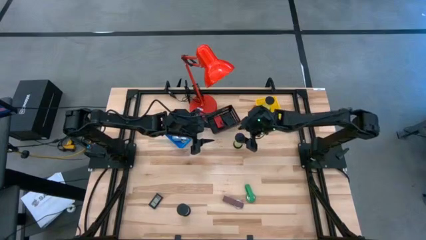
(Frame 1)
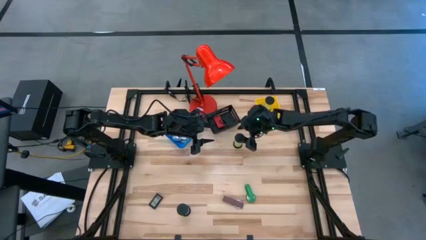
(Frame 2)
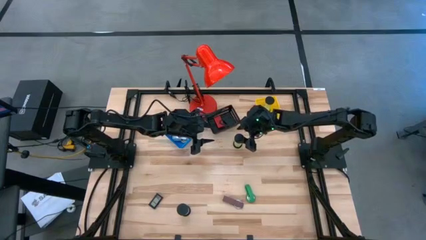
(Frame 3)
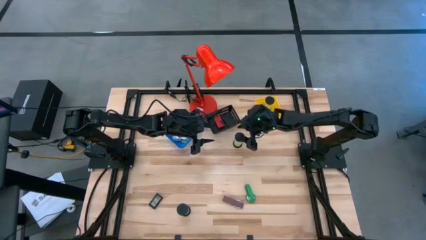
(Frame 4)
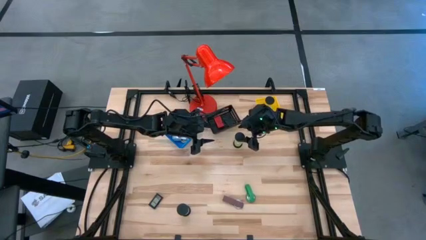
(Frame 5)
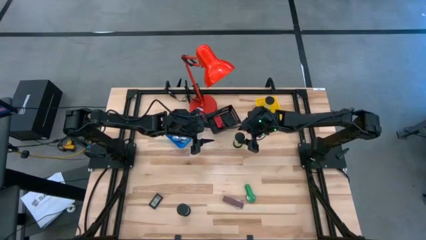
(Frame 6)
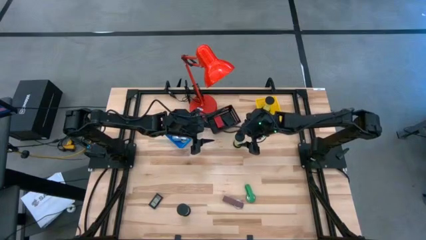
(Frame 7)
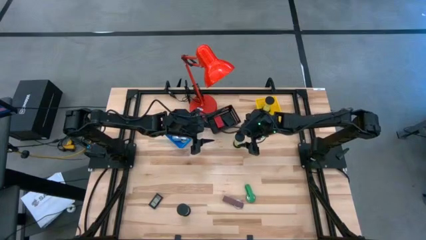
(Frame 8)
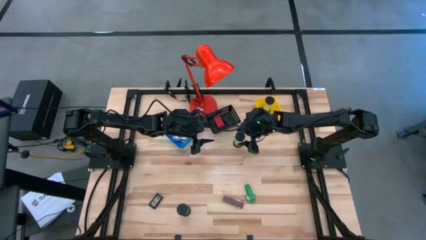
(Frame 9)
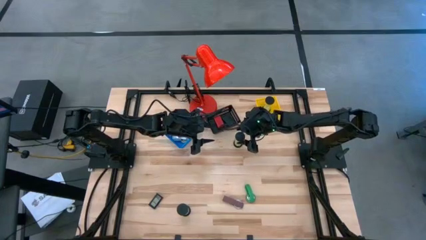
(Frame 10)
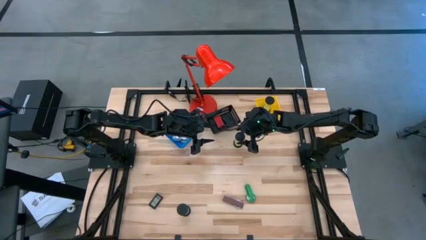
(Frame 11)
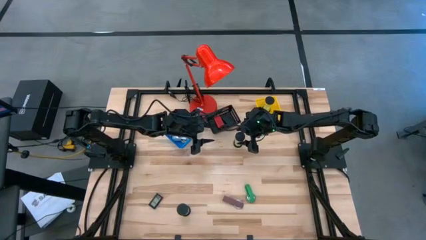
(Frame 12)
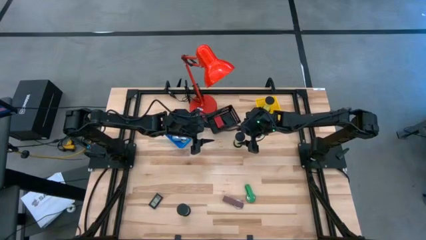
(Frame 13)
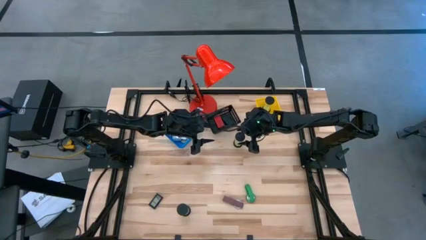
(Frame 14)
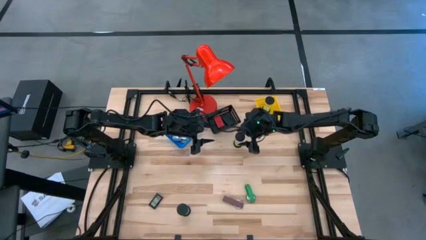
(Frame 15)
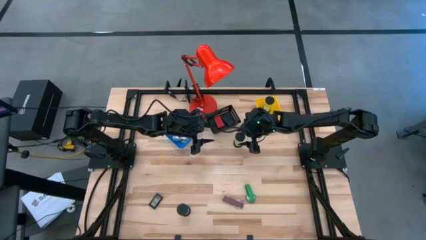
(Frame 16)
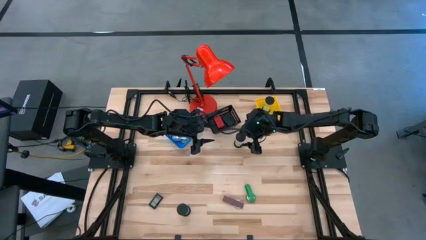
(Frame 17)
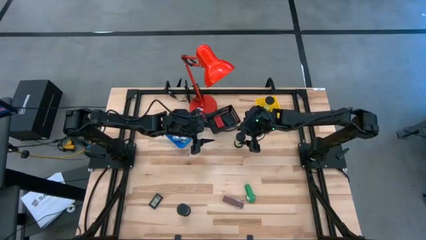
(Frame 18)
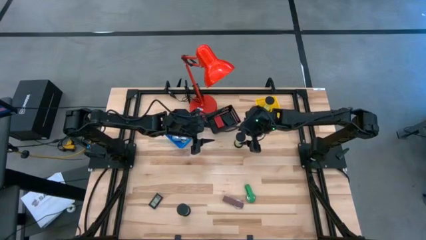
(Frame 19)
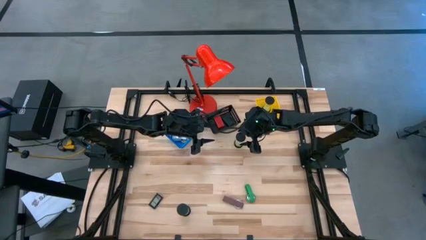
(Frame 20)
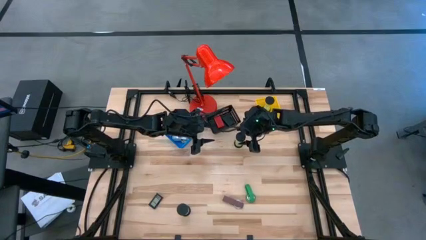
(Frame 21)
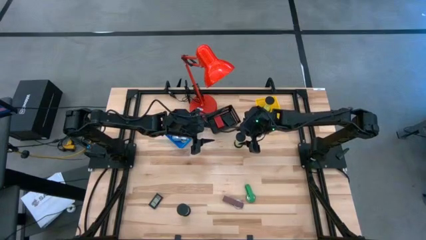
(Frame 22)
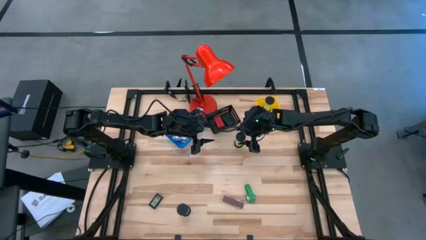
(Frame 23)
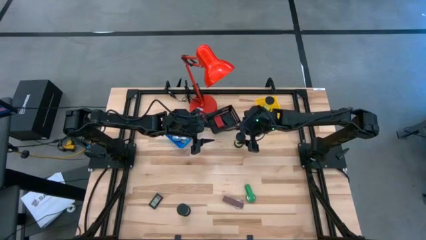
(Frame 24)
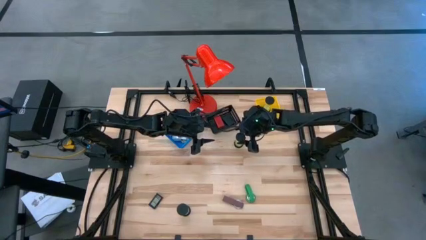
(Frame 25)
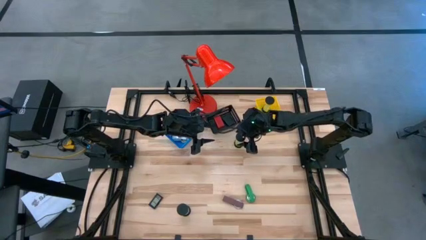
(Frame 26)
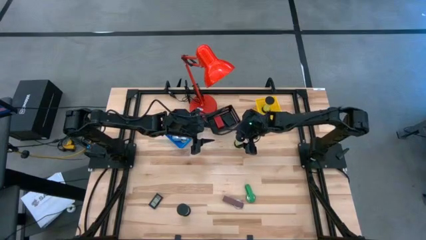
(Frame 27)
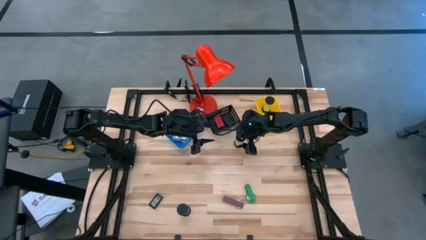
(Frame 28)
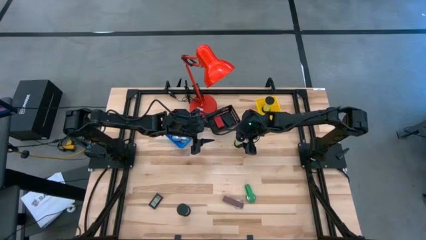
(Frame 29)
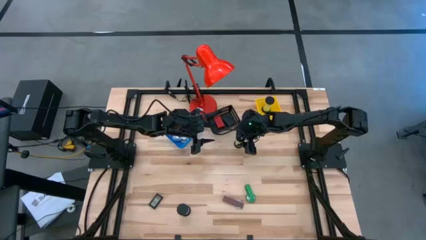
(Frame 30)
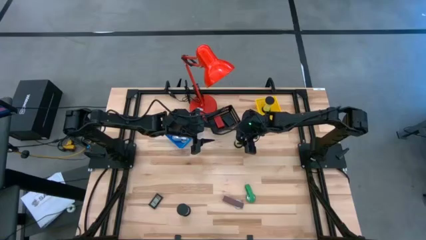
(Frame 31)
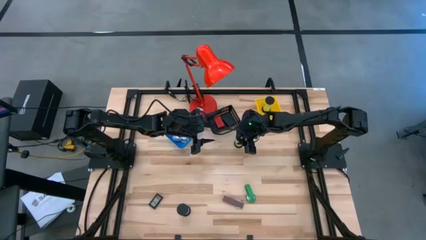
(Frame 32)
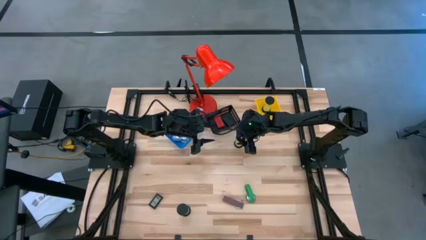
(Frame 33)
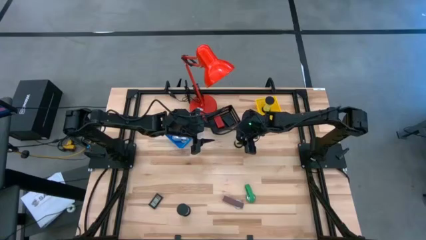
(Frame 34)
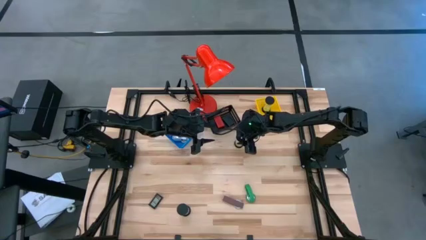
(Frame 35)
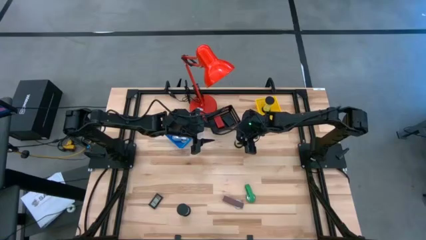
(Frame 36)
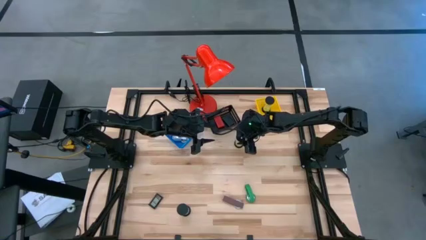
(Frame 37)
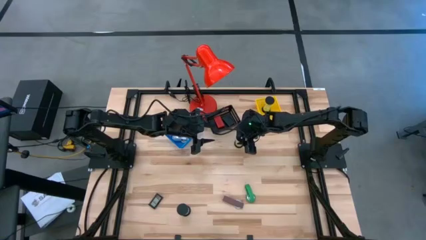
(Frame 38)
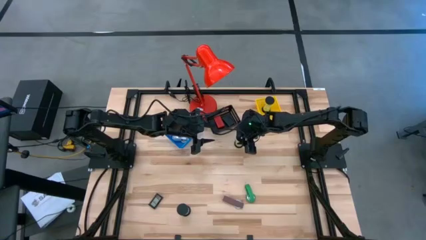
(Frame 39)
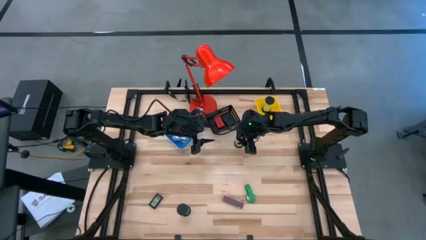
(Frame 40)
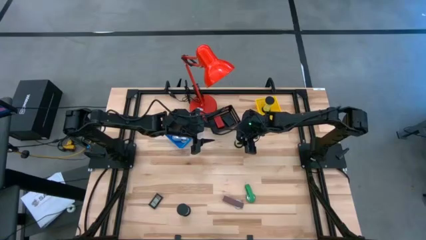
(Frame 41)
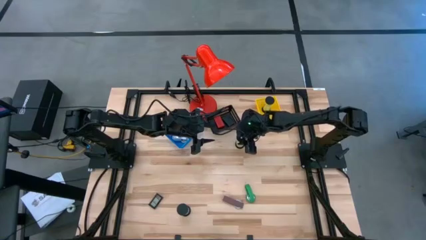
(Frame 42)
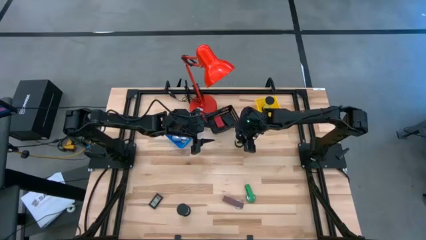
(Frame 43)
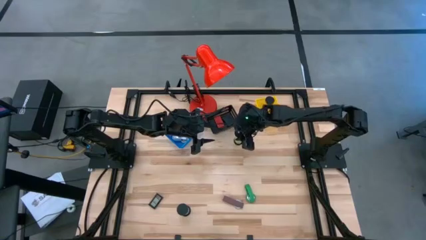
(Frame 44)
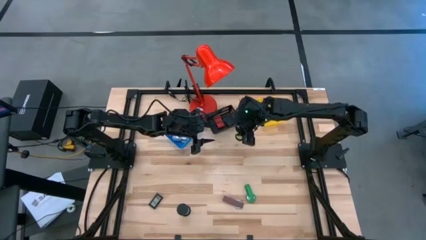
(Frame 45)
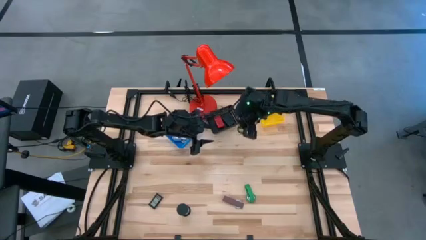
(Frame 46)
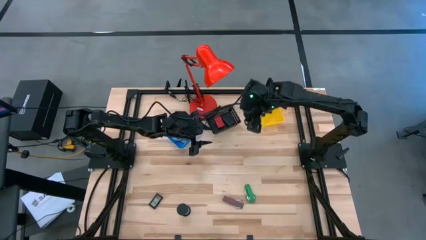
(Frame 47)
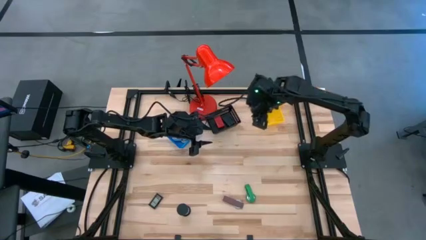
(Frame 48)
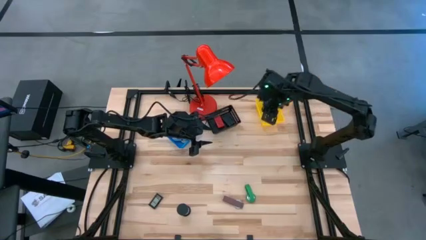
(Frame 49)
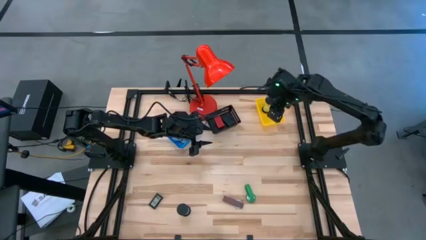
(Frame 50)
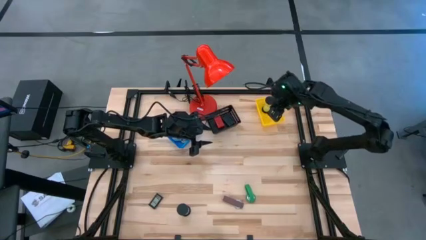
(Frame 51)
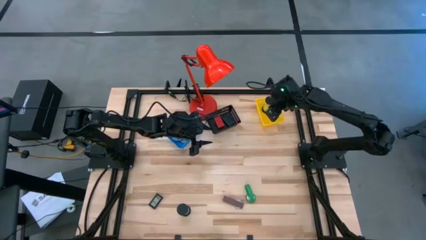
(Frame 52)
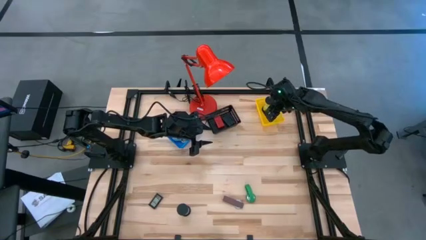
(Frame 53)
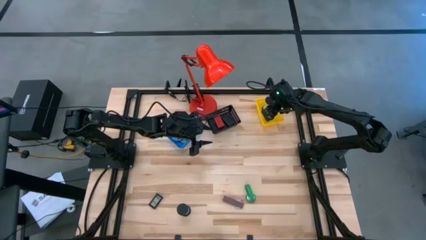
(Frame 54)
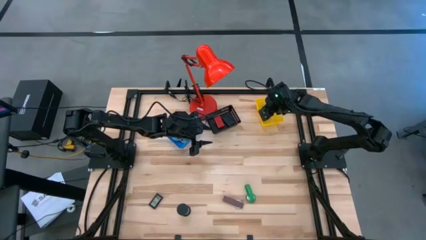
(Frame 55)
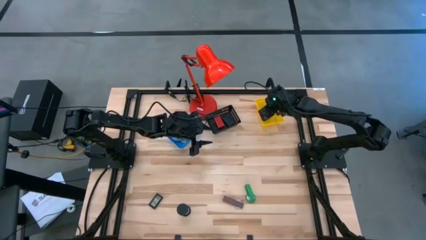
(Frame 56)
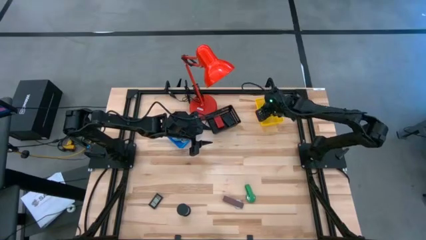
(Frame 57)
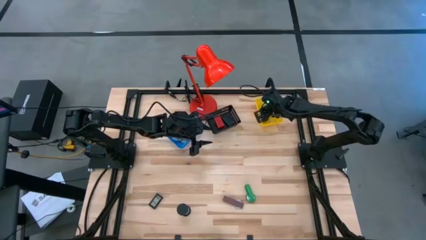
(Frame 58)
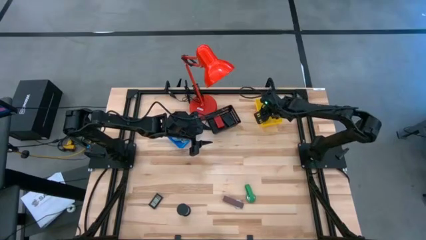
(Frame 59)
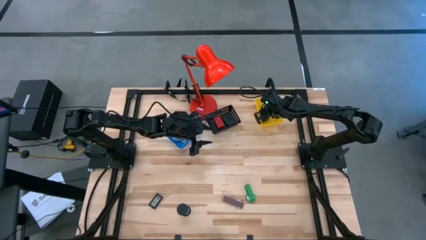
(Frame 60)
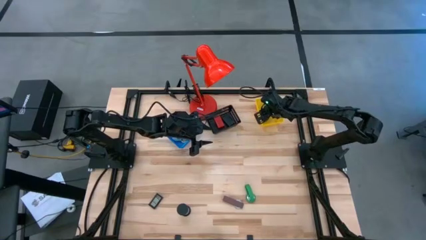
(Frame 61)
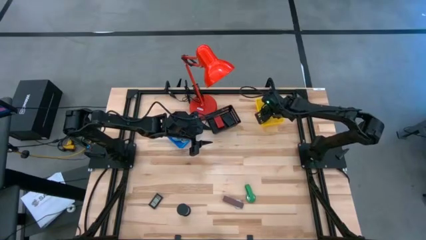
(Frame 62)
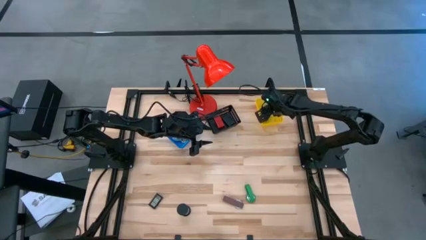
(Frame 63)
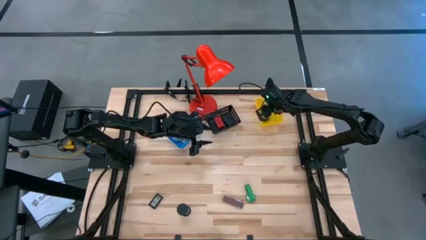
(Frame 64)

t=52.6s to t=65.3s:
Task: Pick & Place Office items
Put the green hourglass into the yellow bin

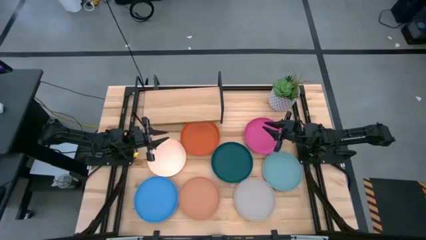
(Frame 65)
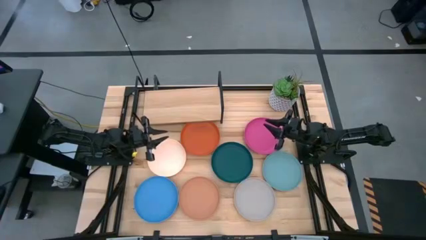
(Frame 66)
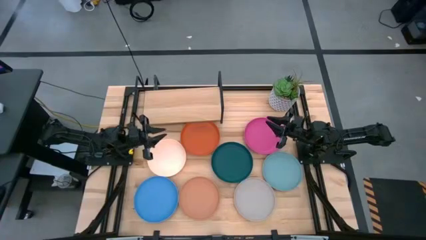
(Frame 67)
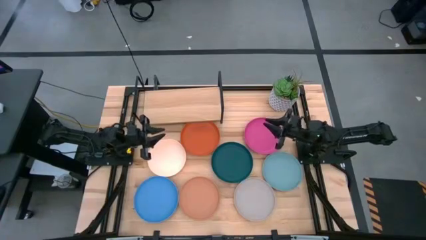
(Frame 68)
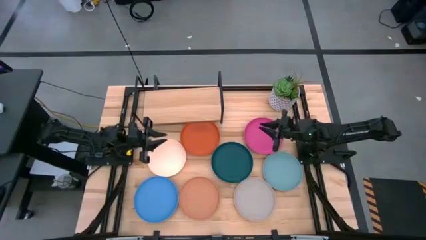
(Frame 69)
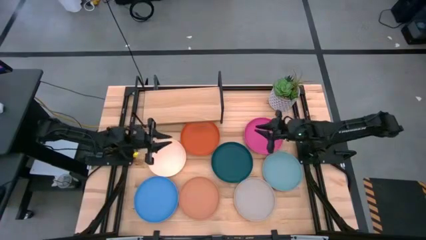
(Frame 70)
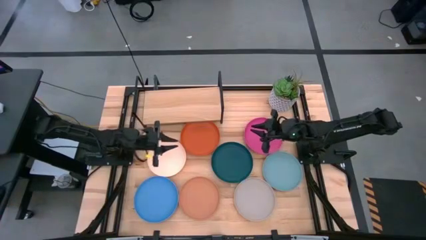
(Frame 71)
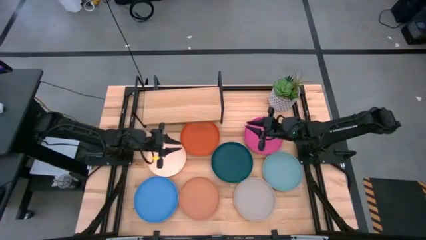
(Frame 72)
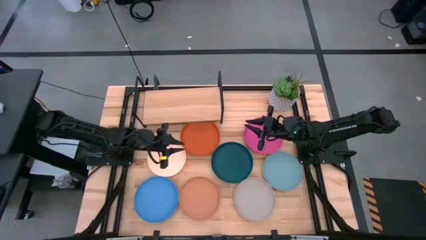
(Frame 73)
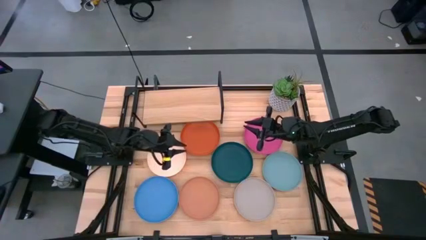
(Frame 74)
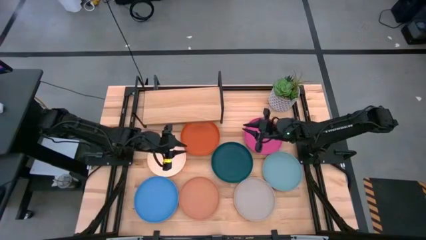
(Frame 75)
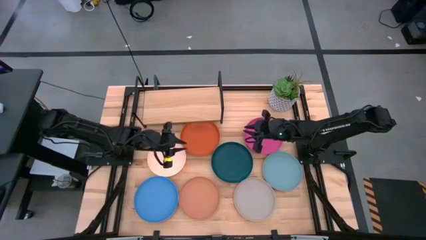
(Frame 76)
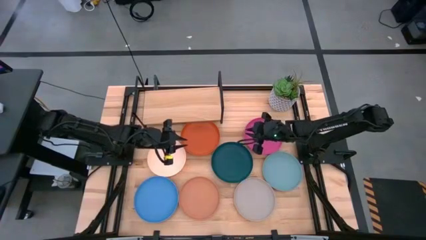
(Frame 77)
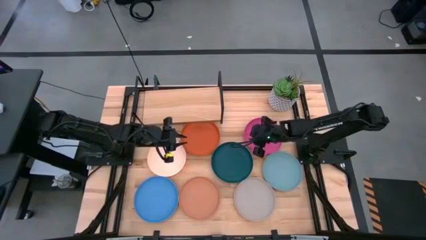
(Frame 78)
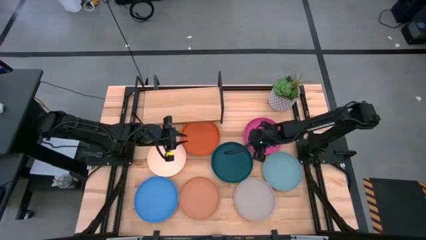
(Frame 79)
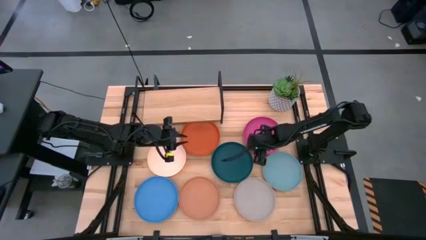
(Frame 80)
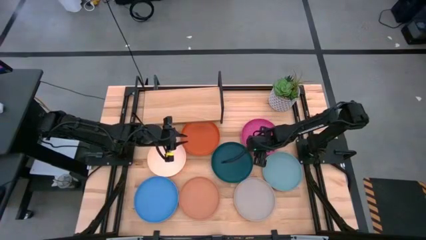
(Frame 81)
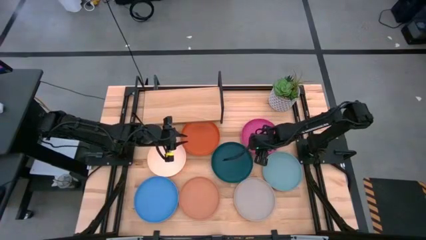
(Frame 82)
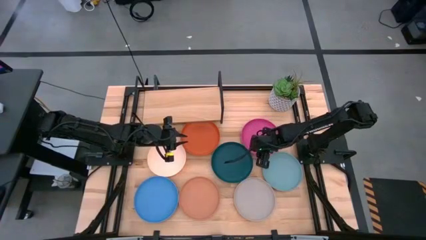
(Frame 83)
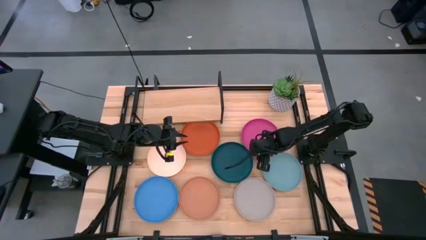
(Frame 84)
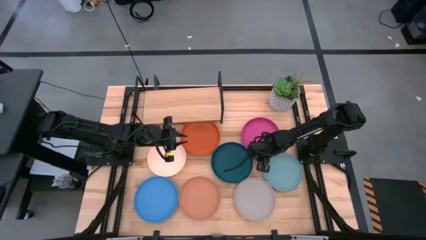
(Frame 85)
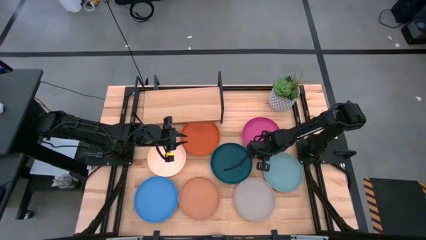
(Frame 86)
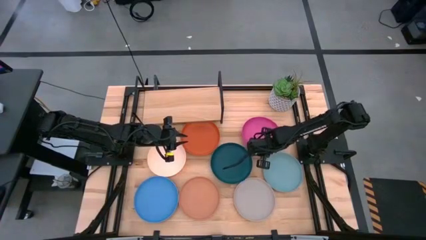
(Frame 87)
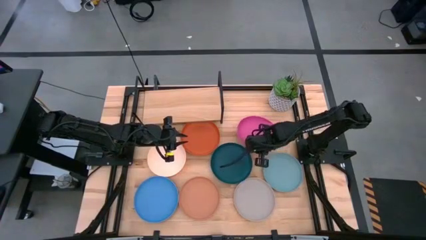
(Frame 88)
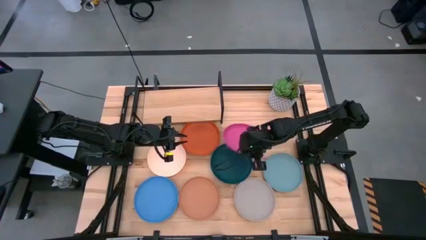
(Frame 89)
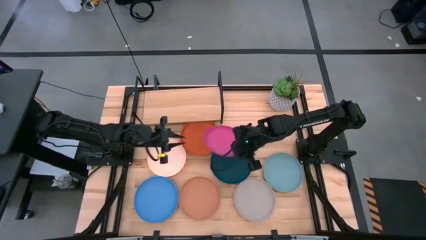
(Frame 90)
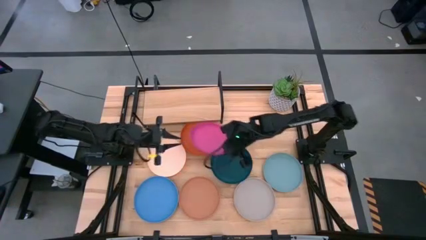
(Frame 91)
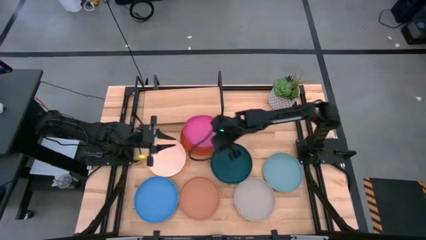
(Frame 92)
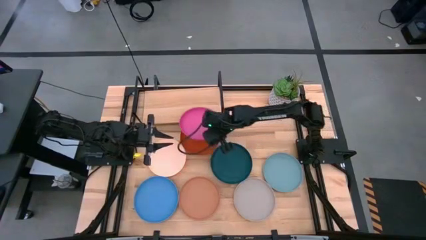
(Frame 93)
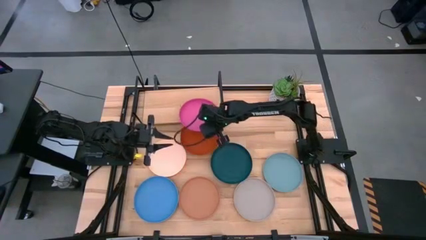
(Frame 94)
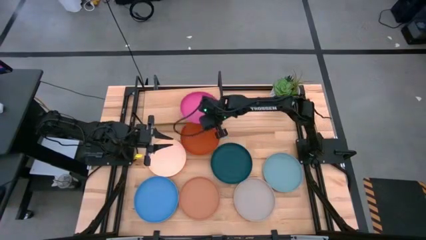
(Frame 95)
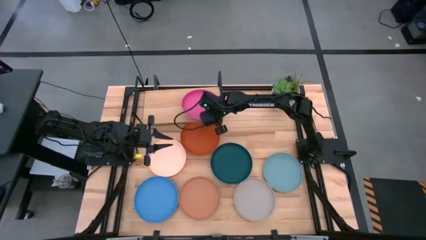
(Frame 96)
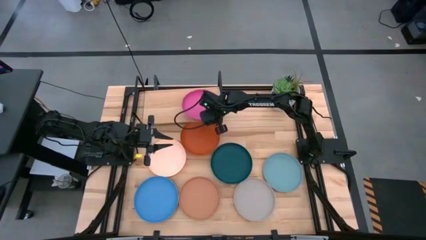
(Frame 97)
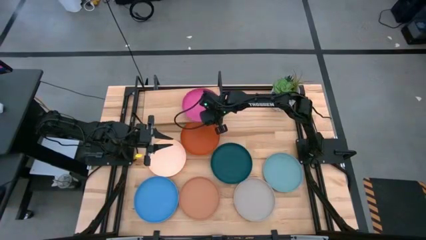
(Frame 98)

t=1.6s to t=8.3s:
Task: Place and stack plates onto a shelf
Put the pink plate on the shelf
